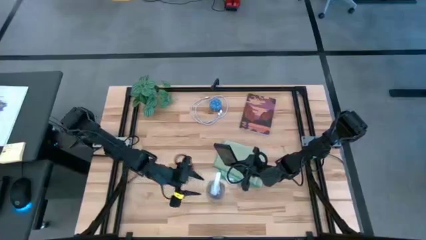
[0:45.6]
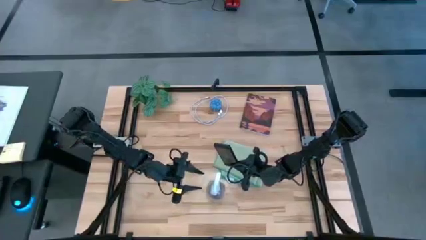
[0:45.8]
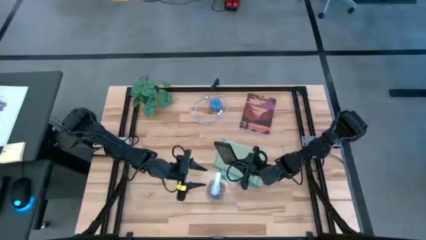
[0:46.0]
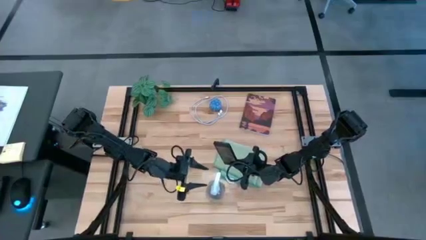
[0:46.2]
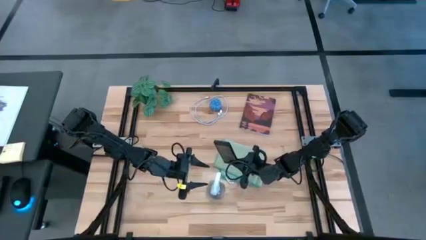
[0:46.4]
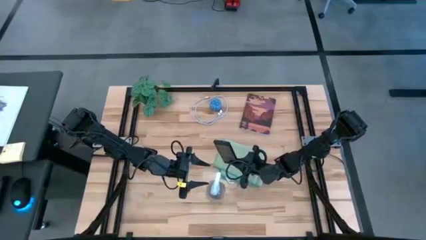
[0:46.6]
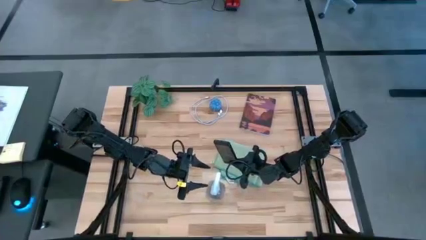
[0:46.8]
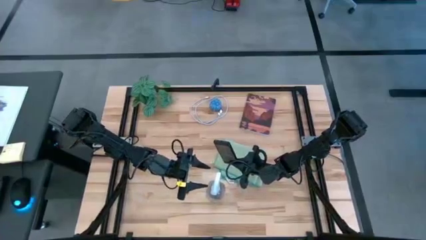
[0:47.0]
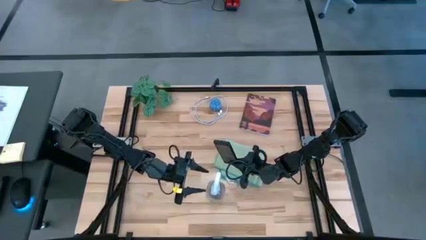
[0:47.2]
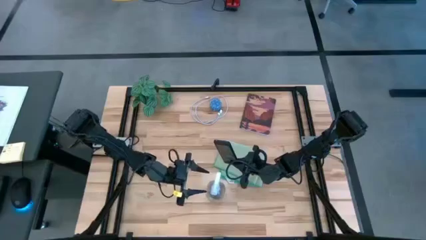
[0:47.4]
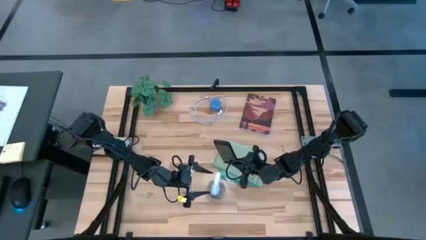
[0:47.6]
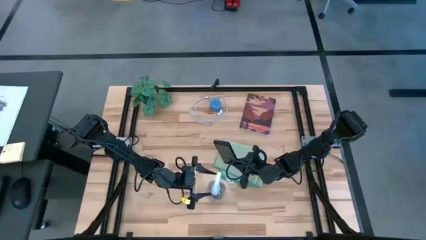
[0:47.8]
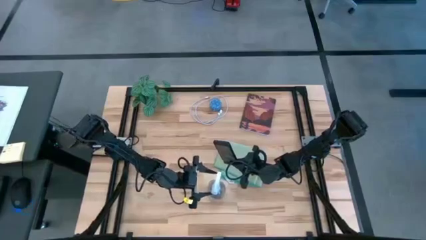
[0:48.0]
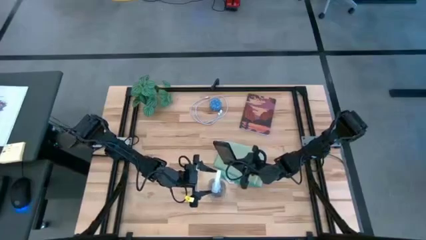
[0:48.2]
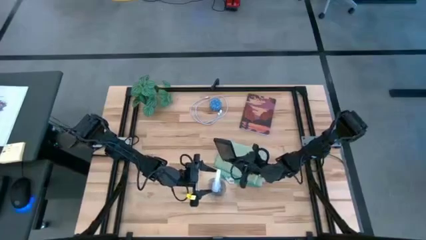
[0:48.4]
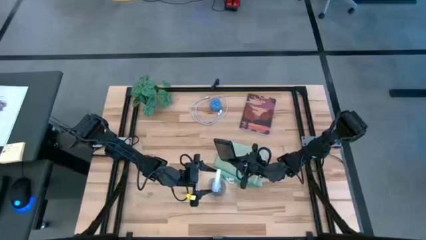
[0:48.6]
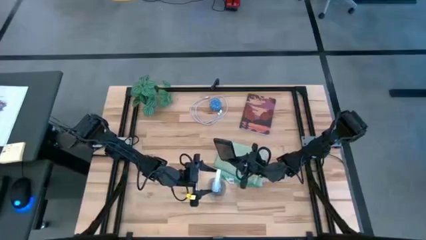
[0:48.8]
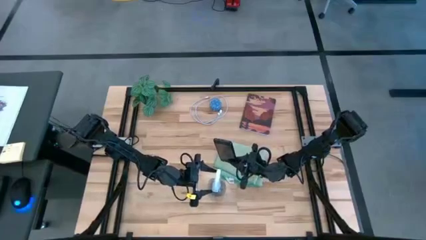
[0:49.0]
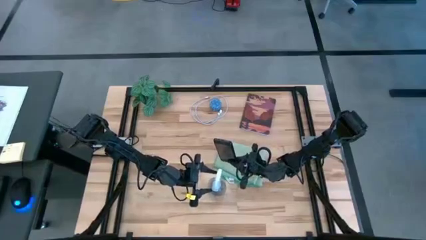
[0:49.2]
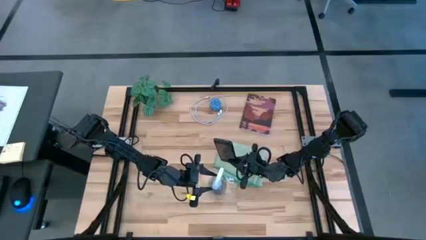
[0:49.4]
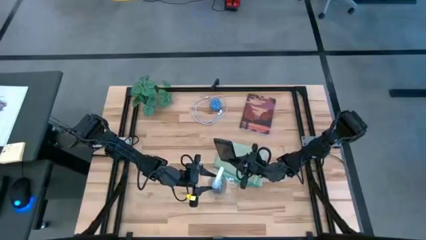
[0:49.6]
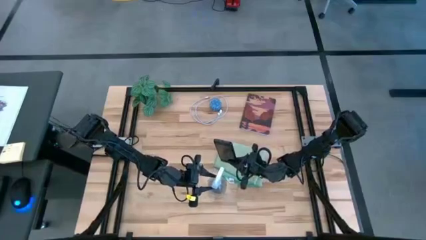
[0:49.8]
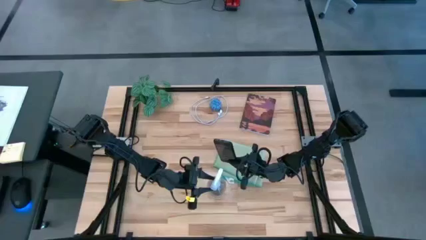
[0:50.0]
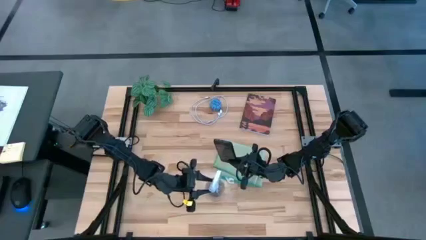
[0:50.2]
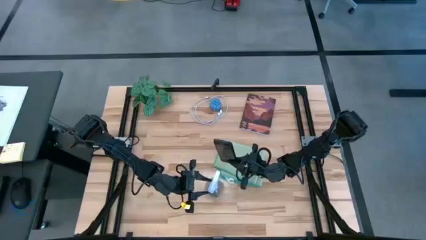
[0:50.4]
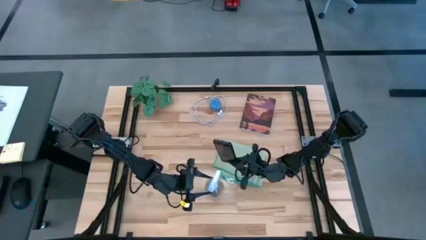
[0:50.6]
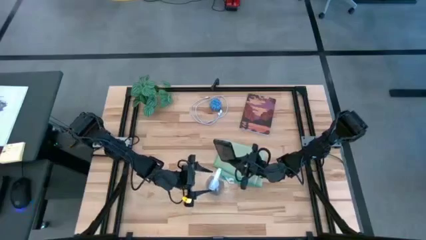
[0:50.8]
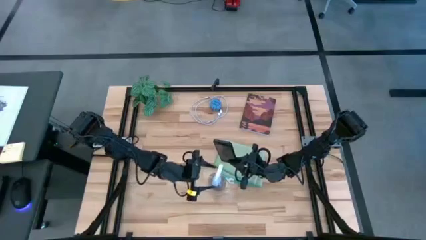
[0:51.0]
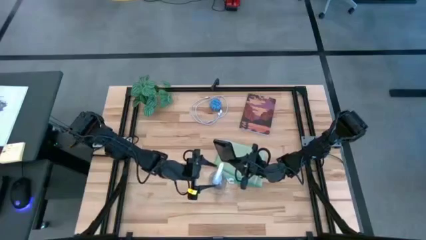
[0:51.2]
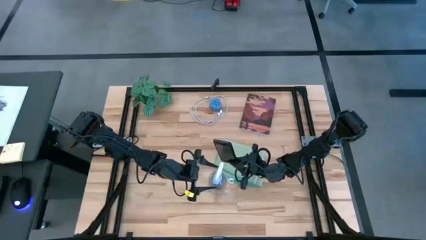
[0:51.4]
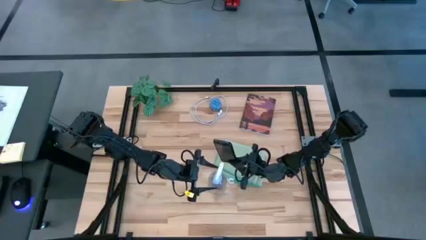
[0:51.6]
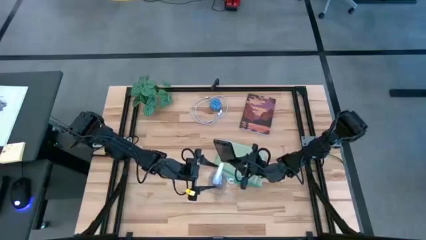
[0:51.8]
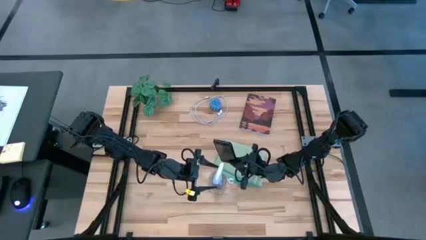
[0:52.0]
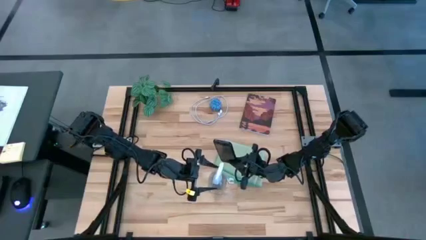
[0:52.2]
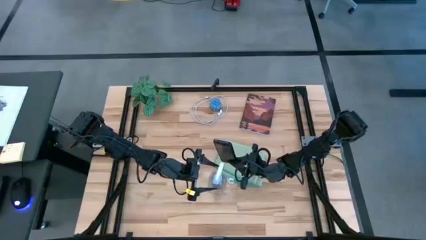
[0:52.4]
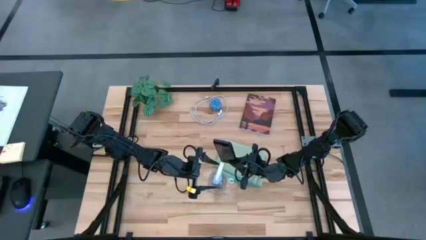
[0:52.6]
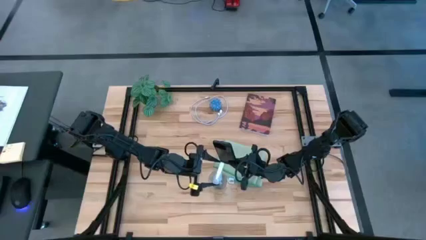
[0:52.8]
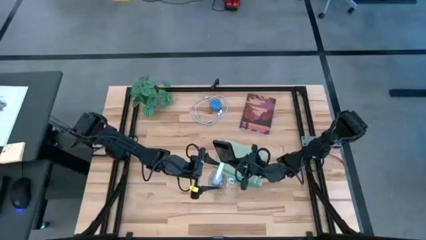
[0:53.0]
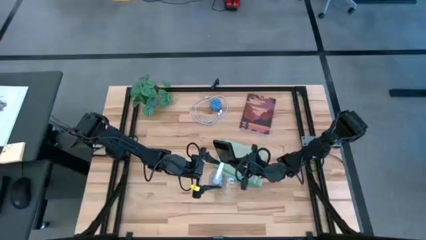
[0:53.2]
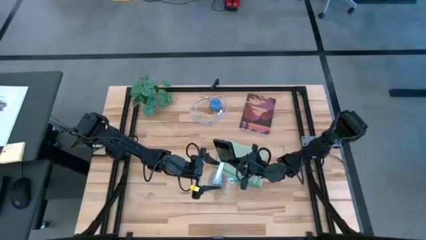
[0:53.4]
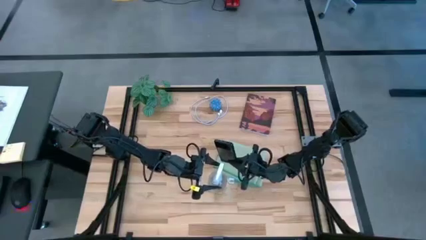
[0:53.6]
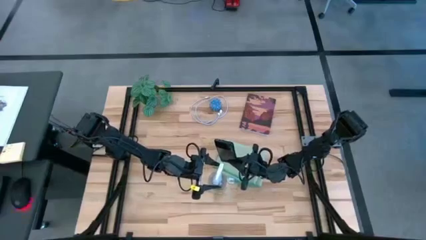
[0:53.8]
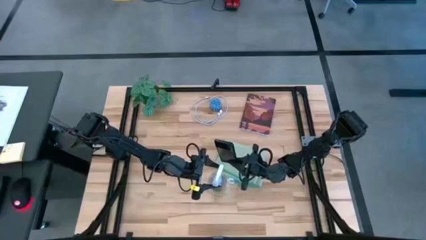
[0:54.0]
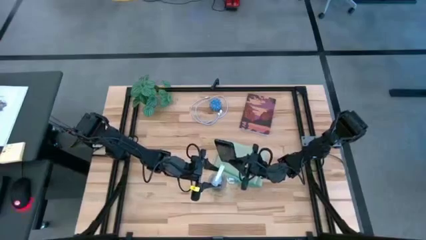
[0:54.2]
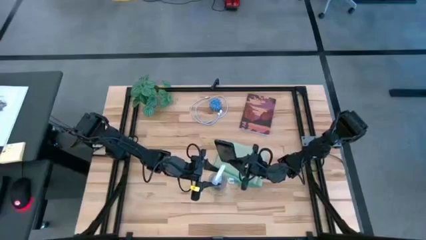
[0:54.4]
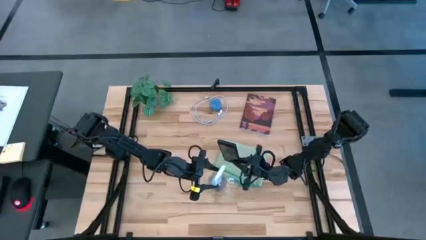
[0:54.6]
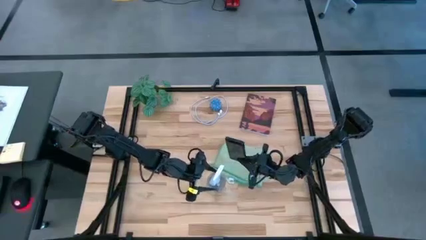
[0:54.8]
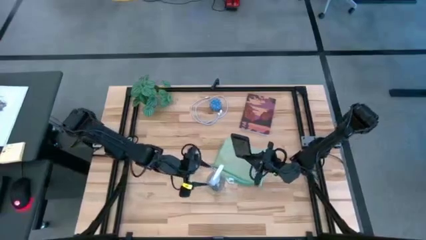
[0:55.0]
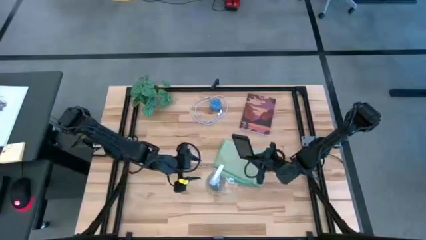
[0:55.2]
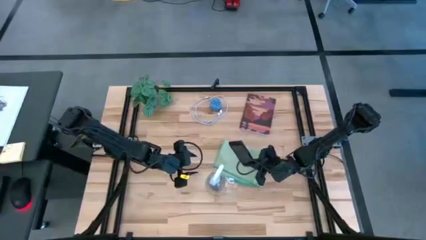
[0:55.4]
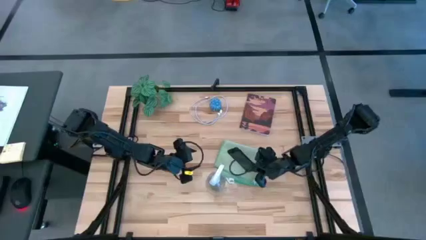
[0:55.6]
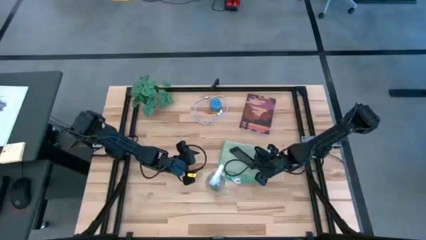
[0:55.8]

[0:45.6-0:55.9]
Task: Apply microfiber cloth
Spray the front of the black cellphone with the spray bottle

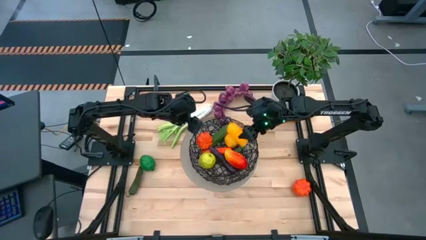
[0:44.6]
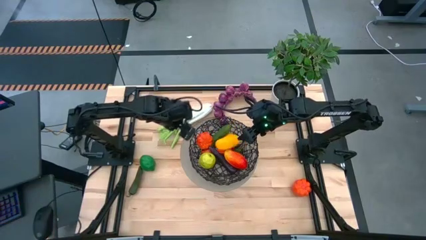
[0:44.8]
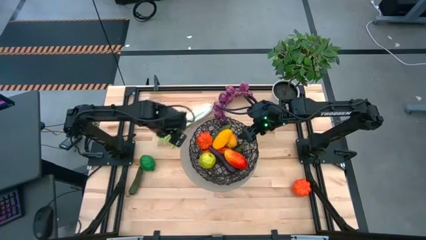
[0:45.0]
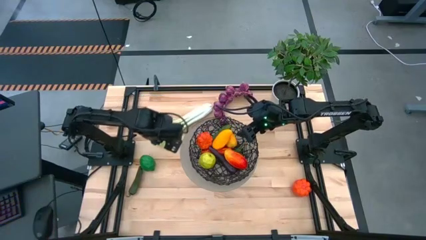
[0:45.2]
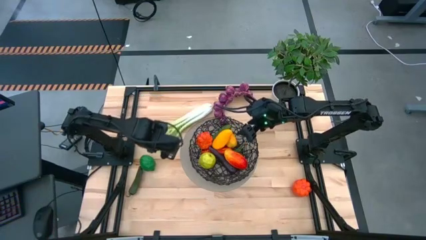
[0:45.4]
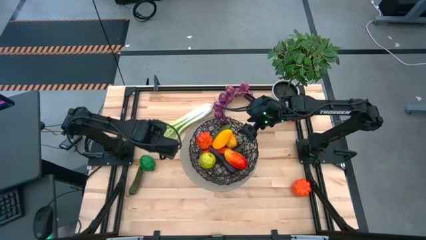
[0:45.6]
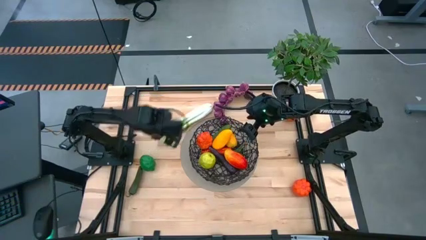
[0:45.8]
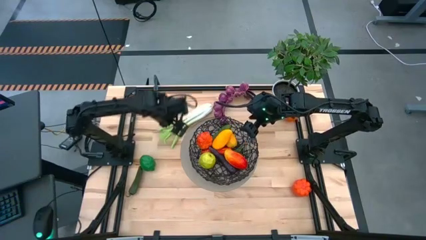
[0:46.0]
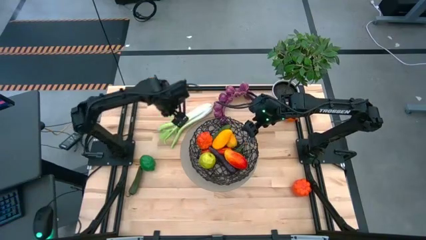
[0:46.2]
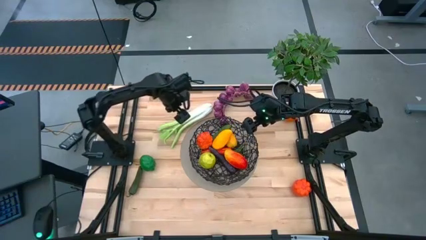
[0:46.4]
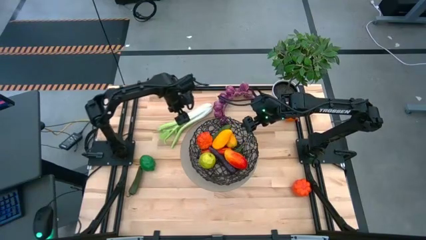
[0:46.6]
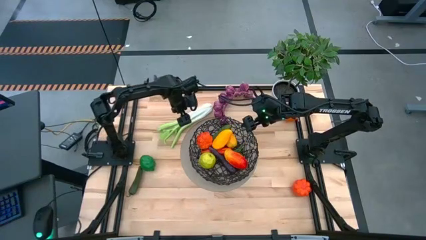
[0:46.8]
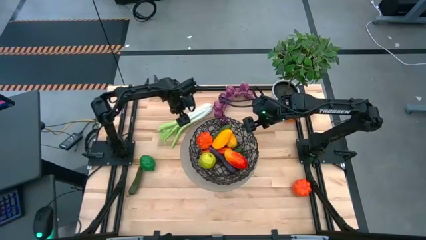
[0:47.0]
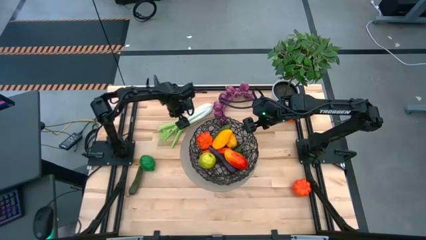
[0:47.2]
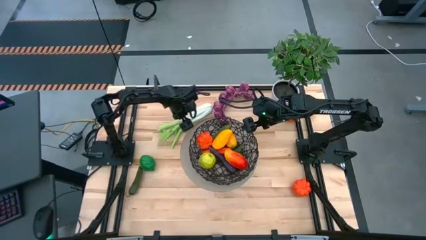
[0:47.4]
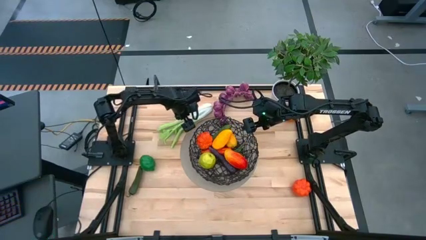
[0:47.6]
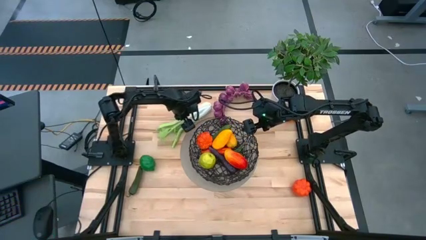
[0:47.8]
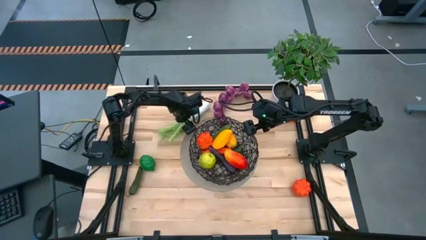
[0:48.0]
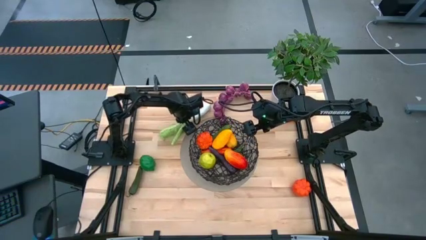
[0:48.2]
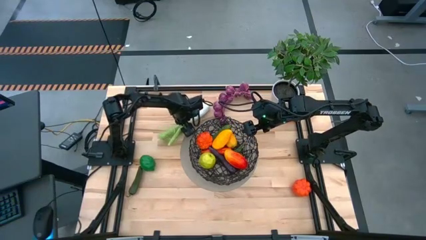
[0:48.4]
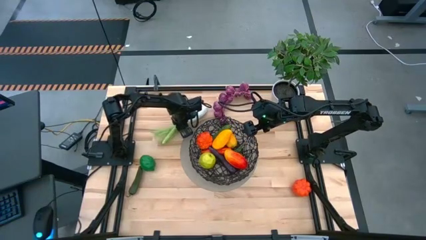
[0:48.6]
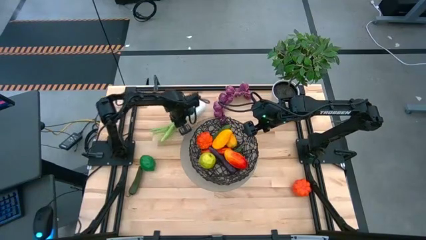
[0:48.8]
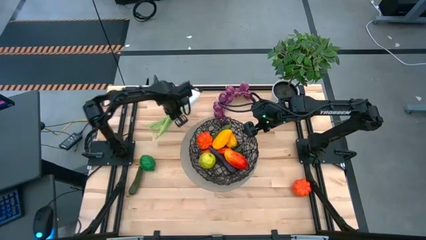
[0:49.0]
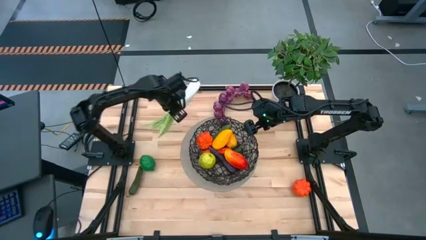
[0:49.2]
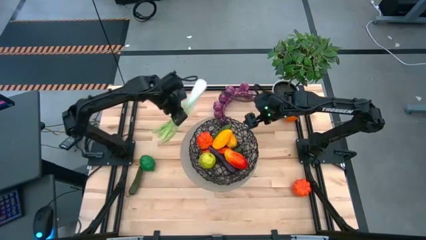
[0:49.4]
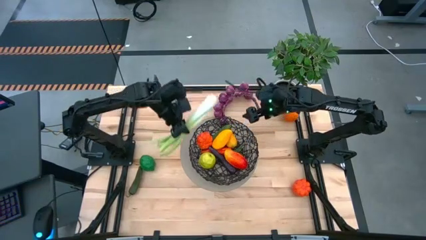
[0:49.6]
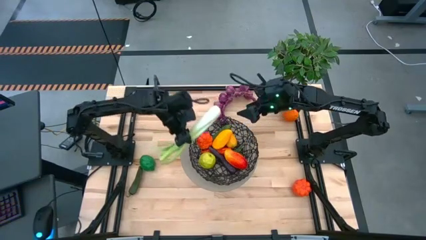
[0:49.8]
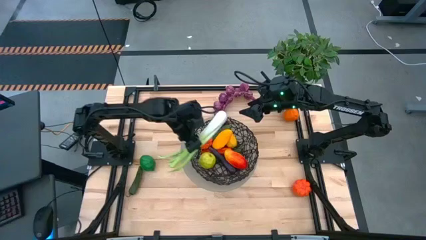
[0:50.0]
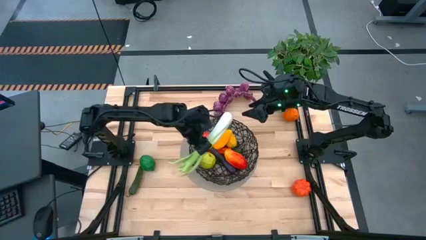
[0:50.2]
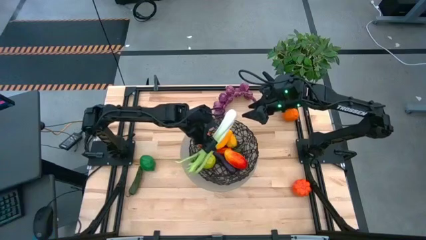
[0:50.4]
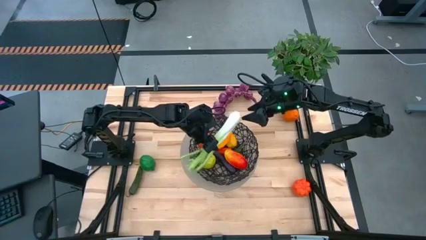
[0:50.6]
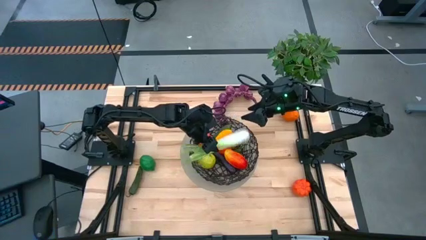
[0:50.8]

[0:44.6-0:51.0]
Task: Build produce basket
Put the green spring onions into the black wire basket
